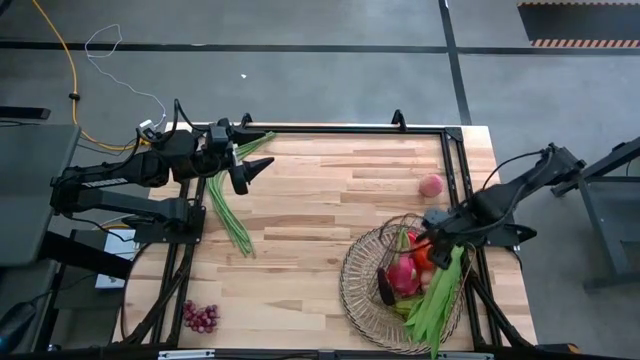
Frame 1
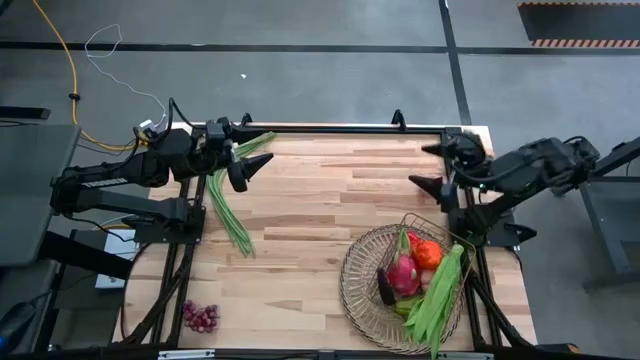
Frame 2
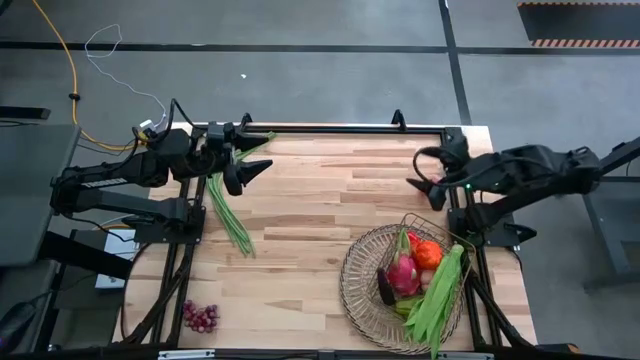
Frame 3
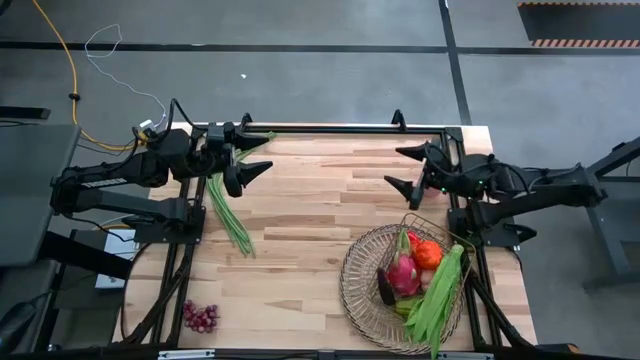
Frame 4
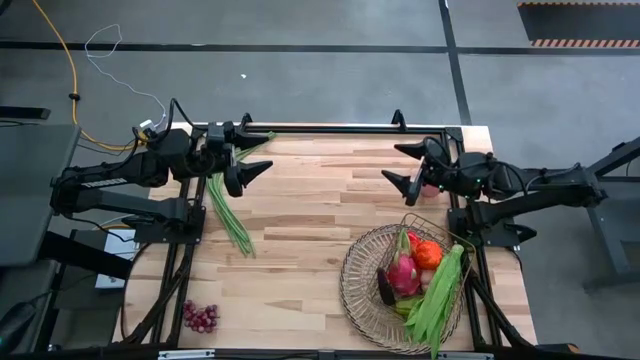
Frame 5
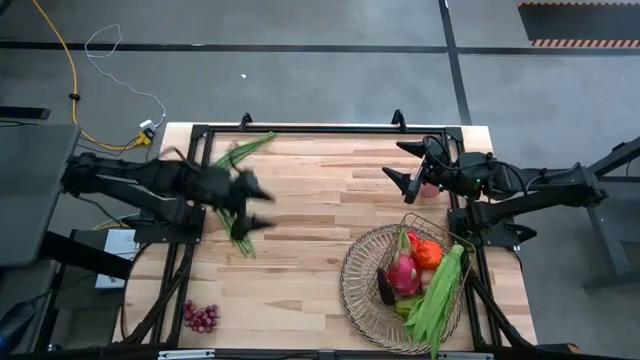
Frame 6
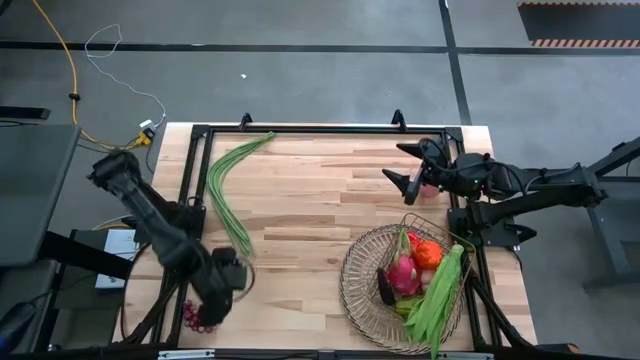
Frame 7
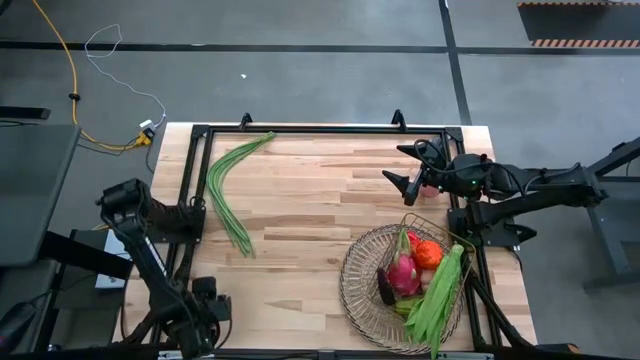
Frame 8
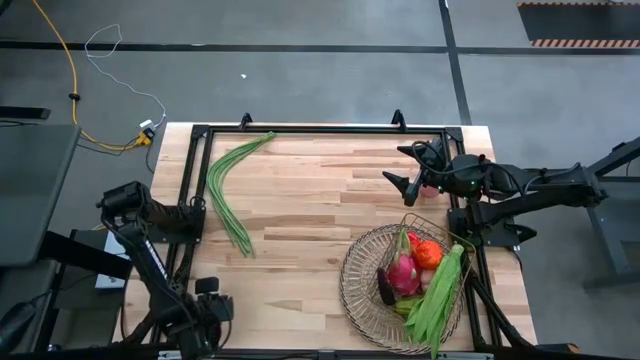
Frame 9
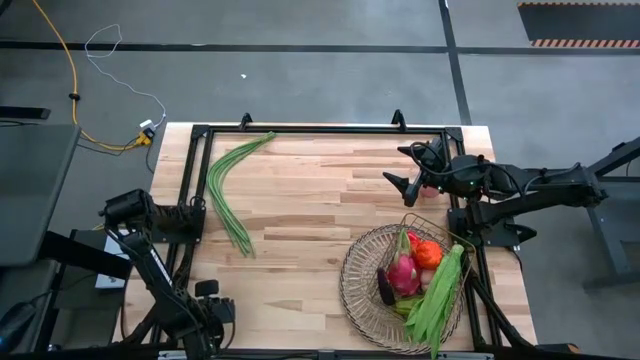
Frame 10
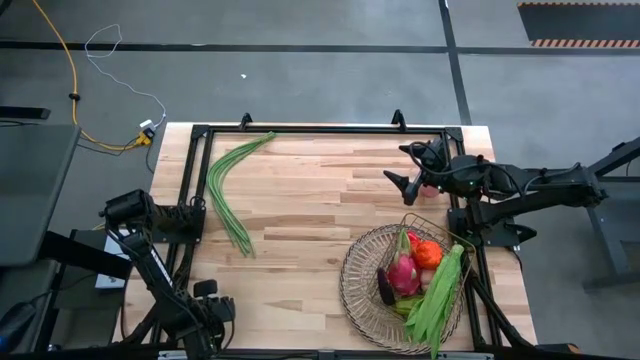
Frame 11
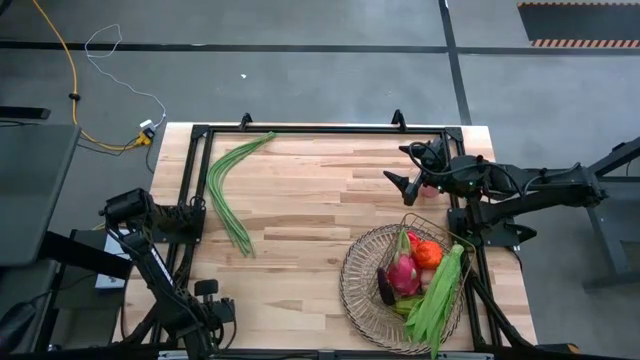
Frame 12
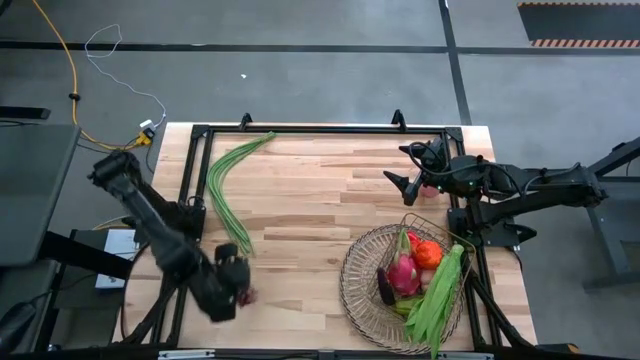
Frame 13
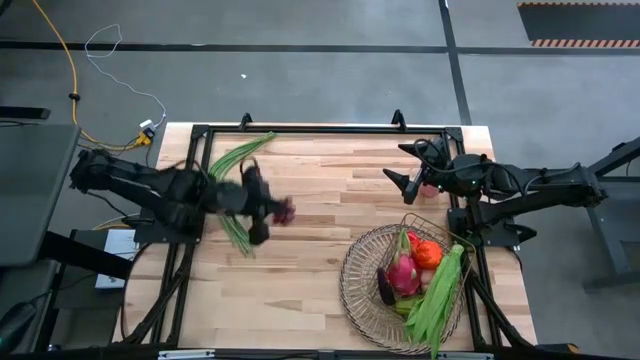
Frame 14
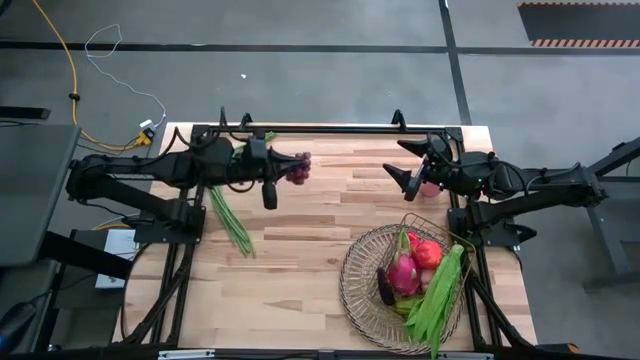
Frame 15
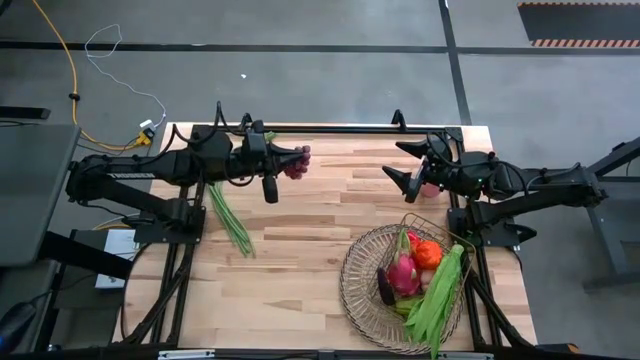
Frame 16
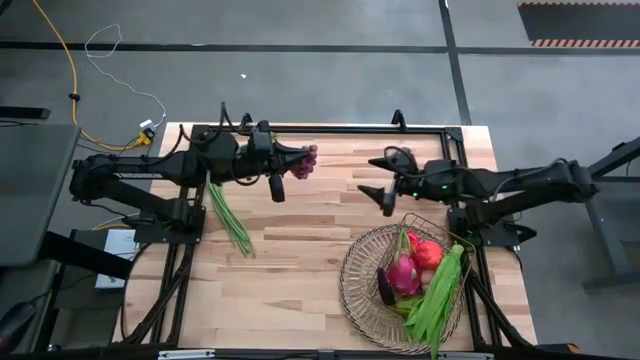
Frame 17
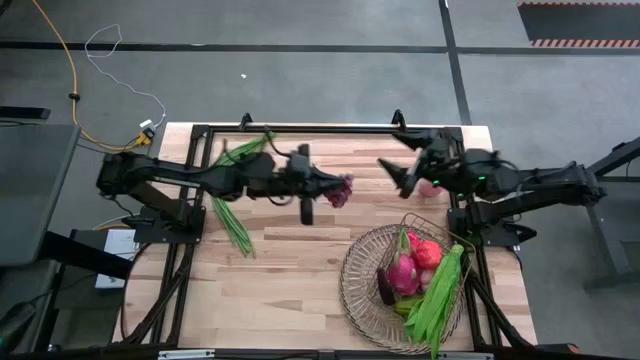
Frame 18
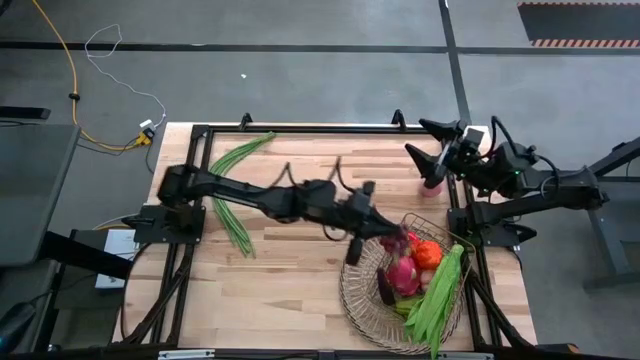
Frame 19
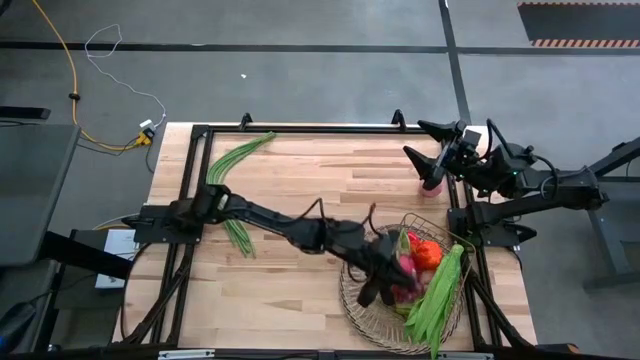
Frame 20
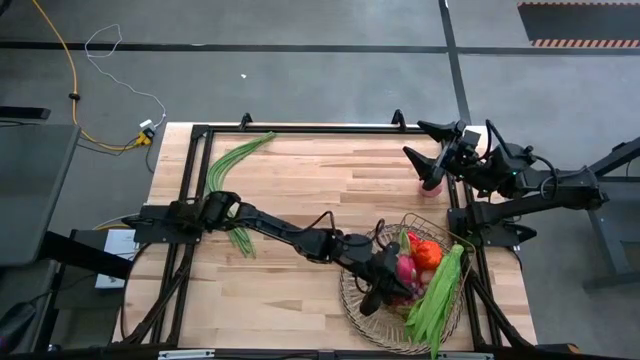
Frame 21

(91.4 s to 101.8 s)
Task: Build produce basket
Put the grapes into the wire basket

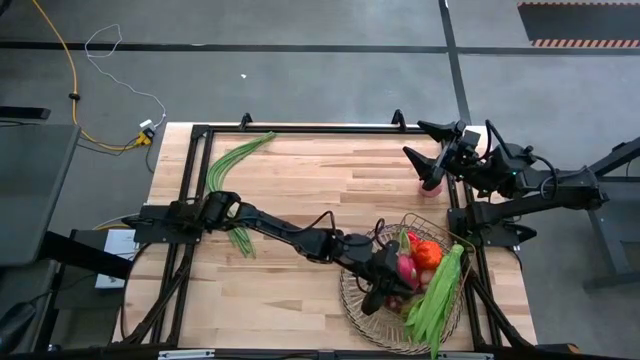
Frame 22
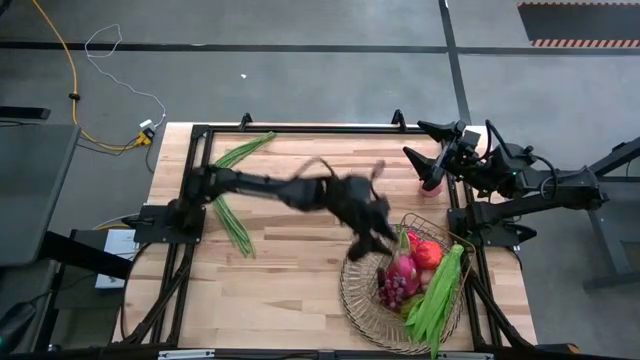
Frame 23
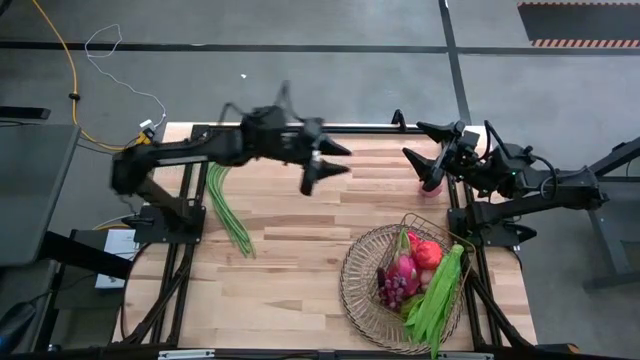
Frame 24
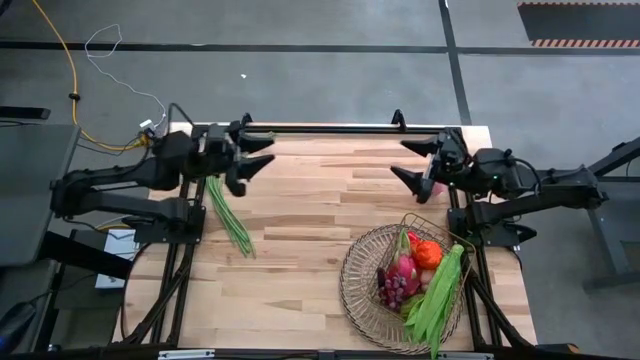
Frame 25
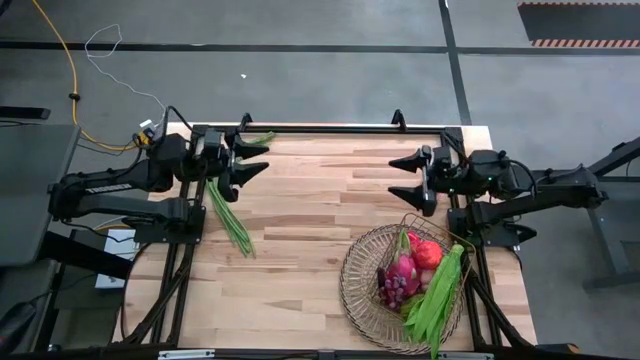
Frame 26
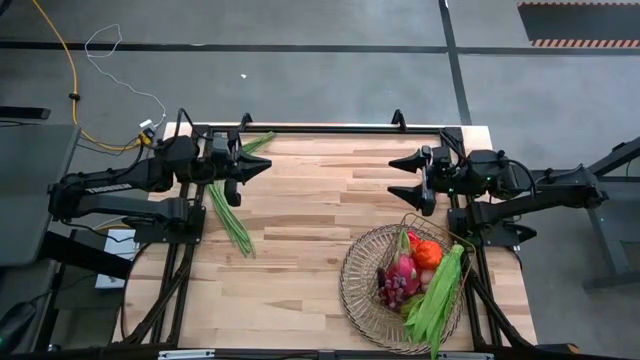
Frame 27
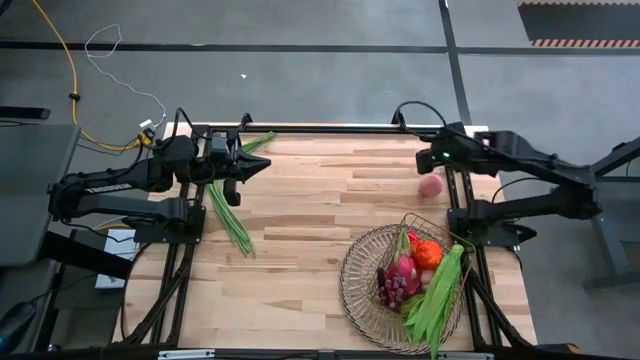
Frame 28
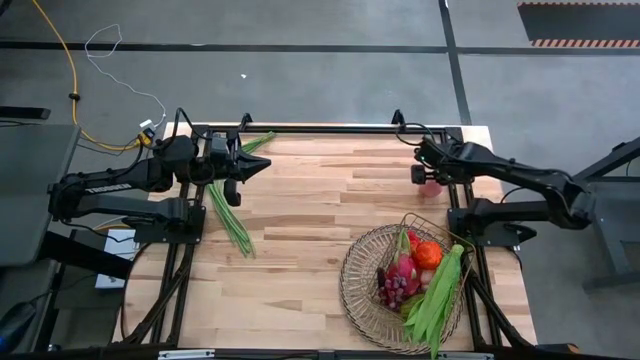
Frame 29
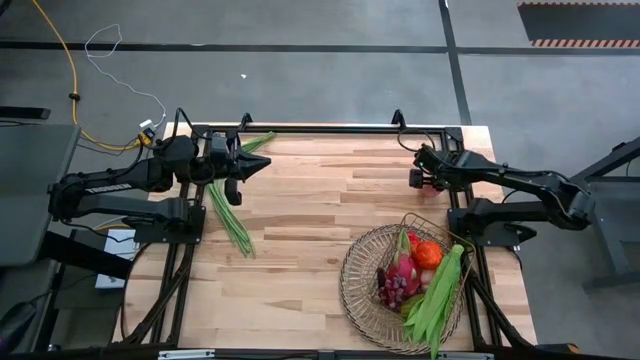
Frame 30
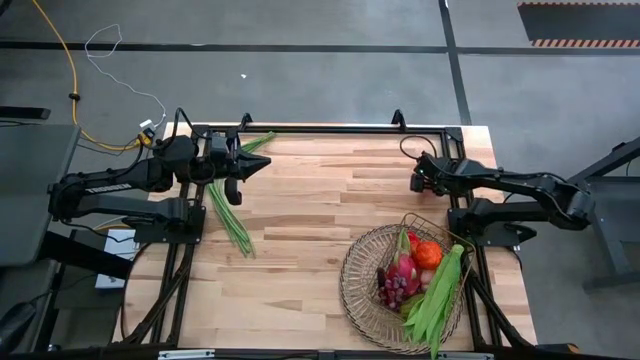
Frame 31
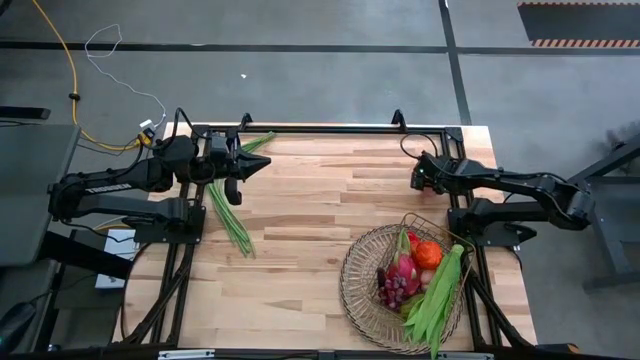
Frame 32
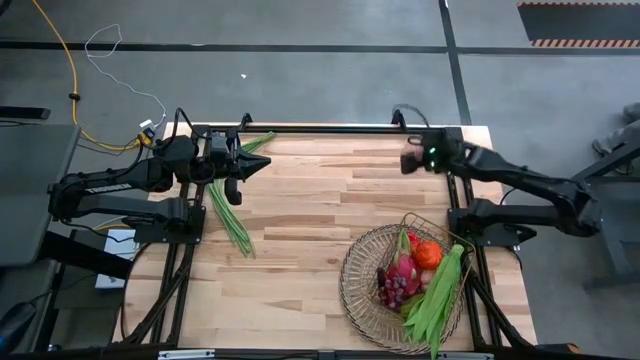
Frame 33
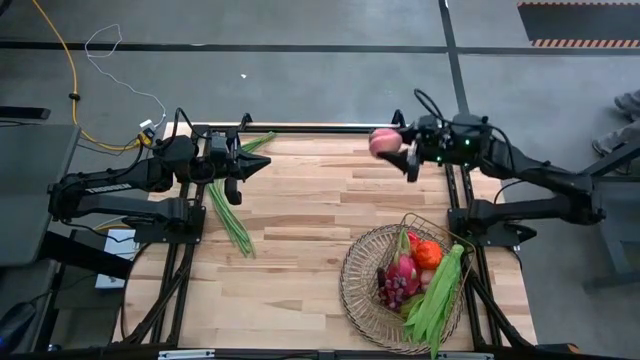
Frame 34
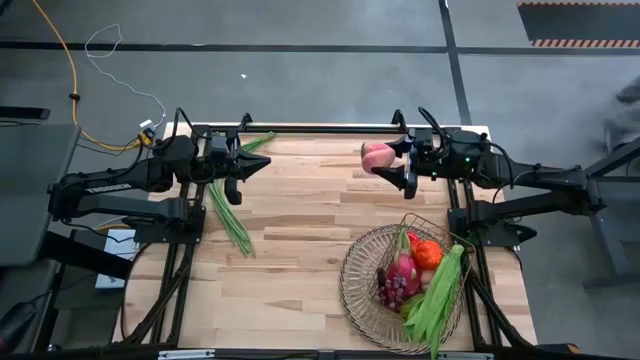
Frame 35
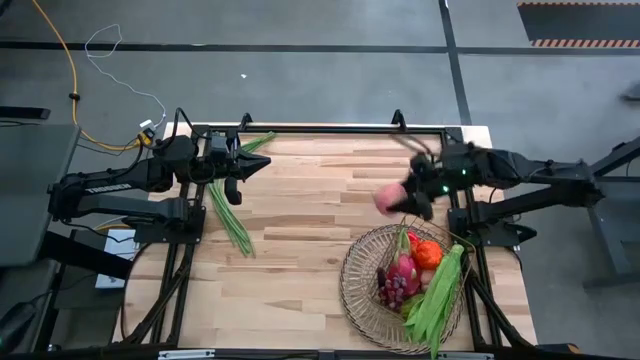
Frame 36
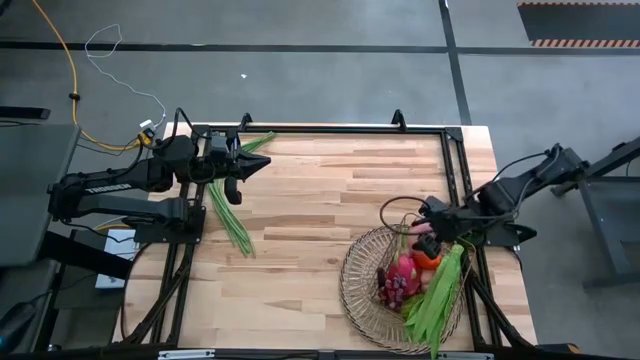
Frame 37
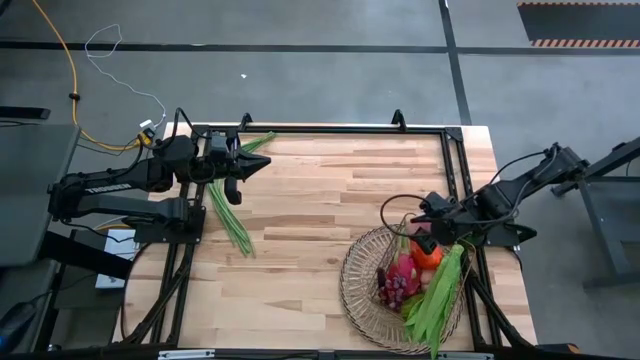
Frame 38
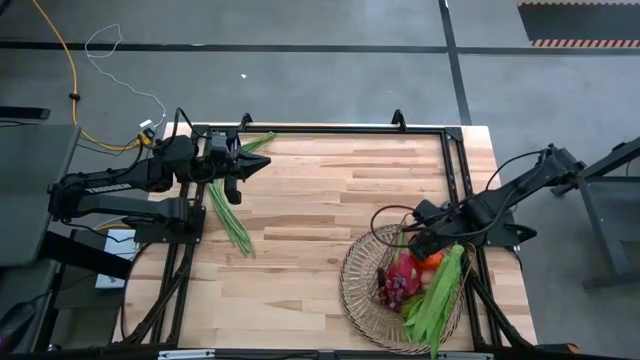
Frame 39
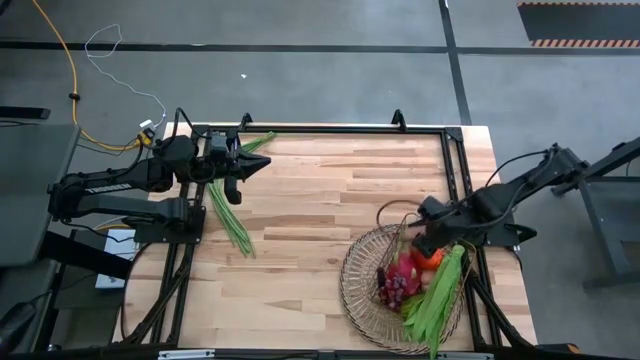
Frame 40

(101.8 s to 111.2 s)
Put the peach into the wire basket
